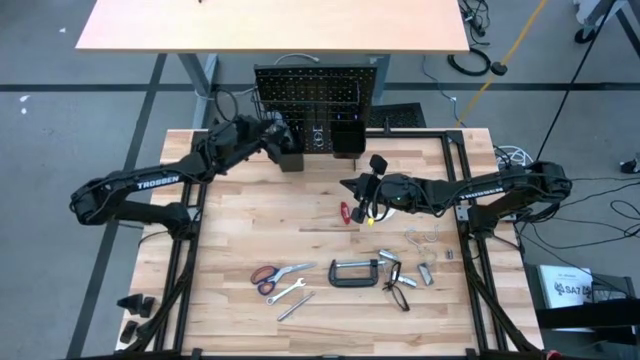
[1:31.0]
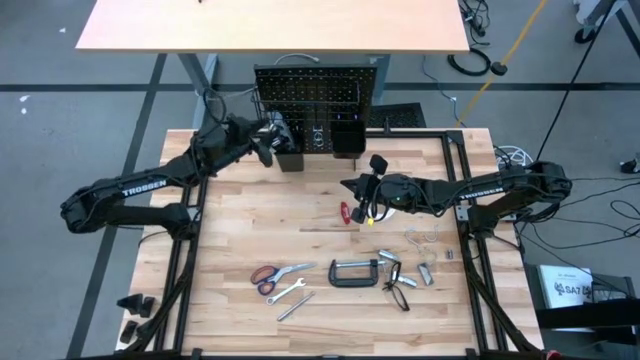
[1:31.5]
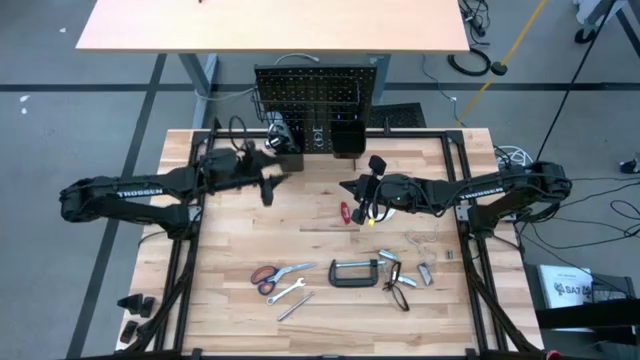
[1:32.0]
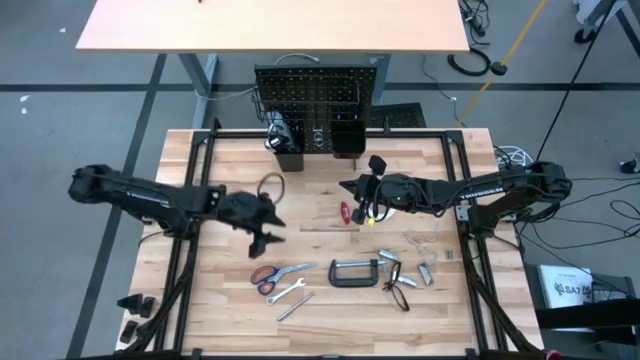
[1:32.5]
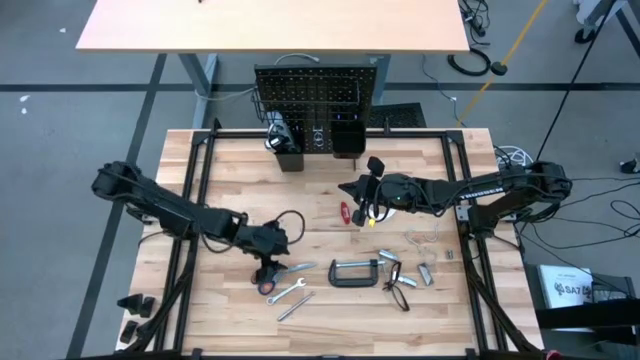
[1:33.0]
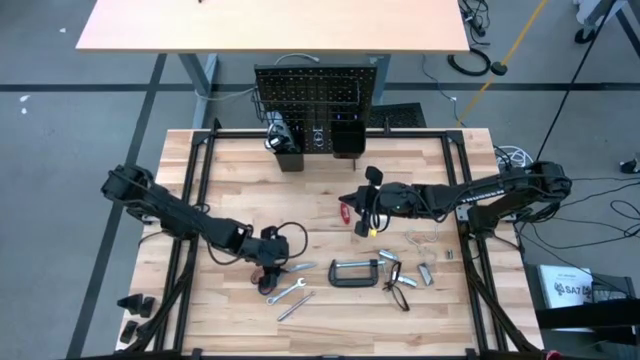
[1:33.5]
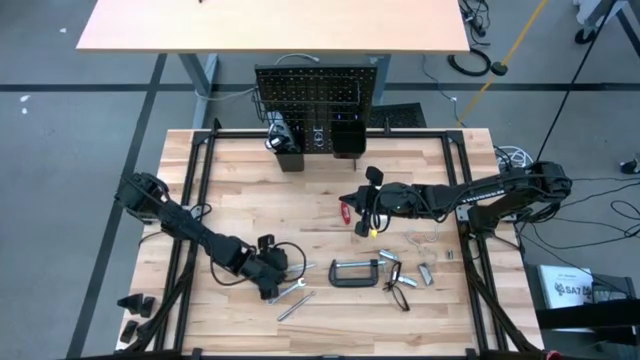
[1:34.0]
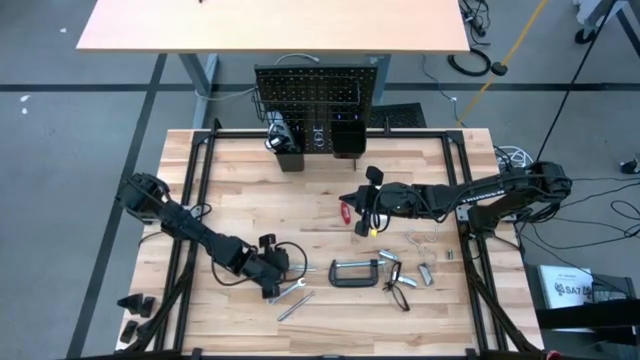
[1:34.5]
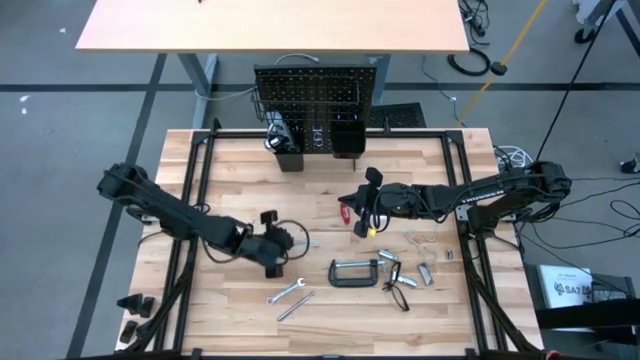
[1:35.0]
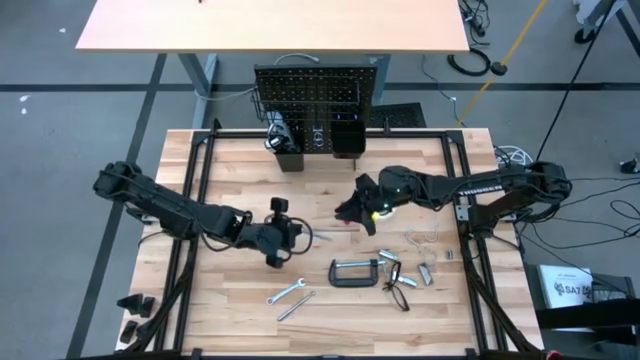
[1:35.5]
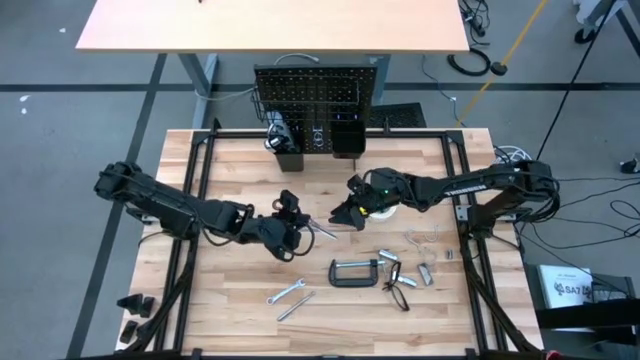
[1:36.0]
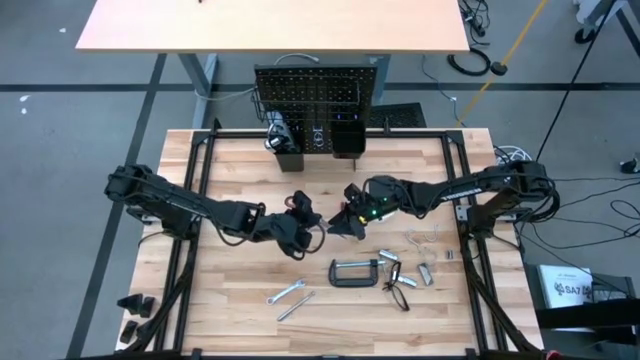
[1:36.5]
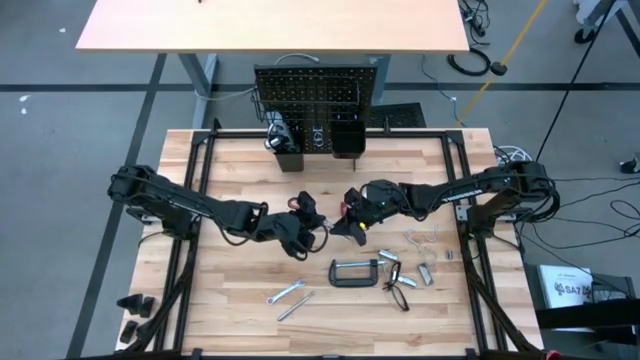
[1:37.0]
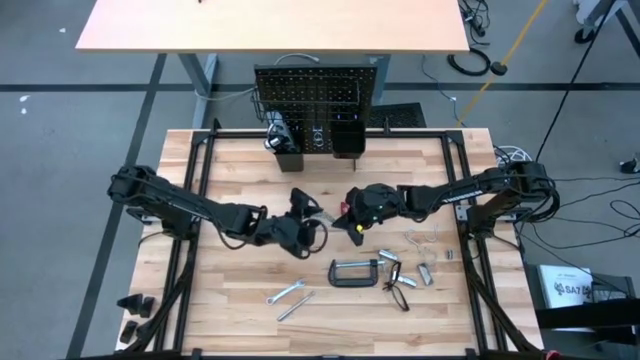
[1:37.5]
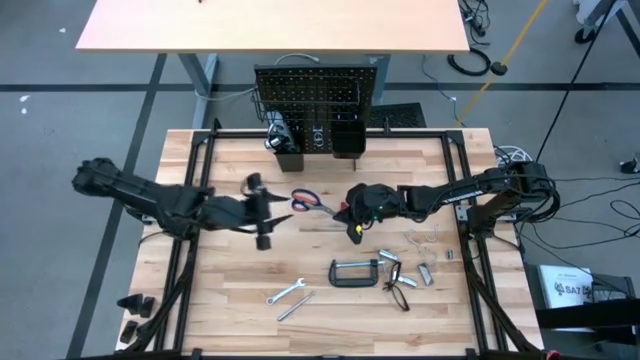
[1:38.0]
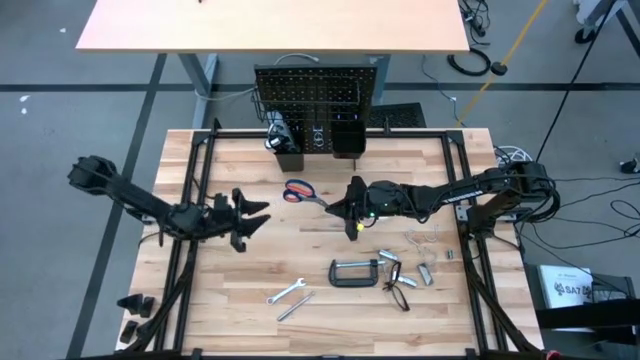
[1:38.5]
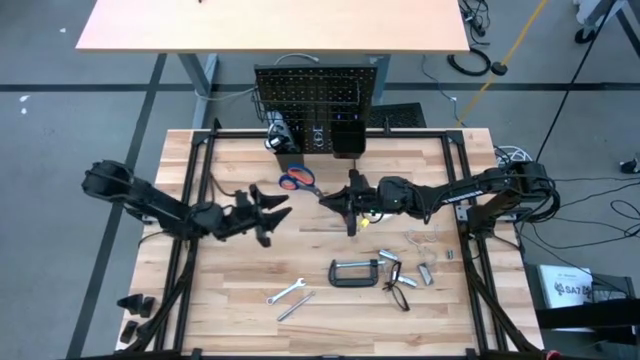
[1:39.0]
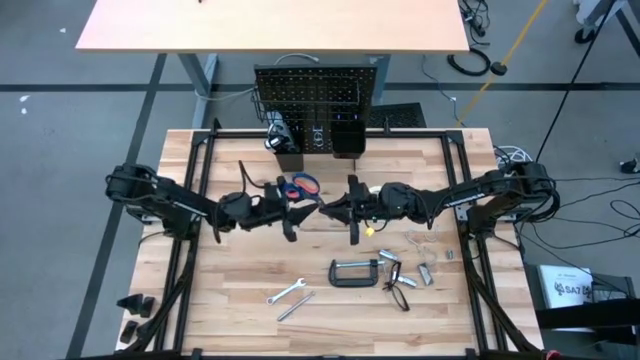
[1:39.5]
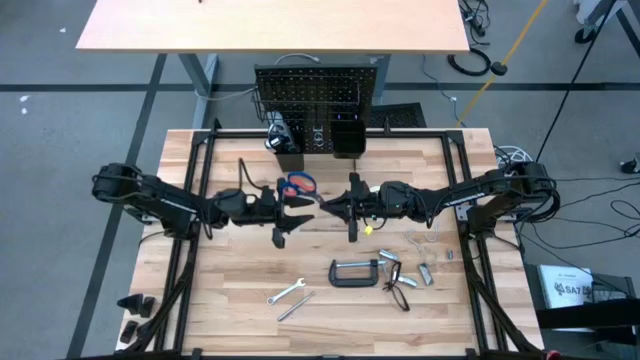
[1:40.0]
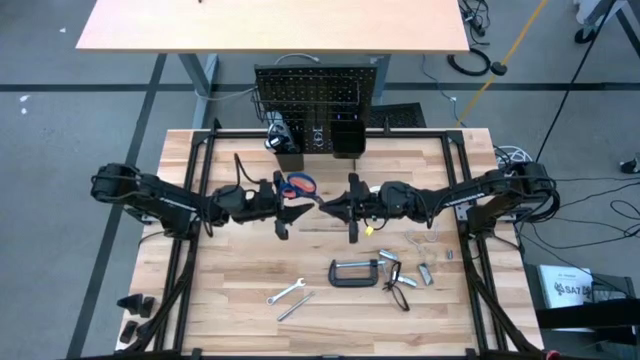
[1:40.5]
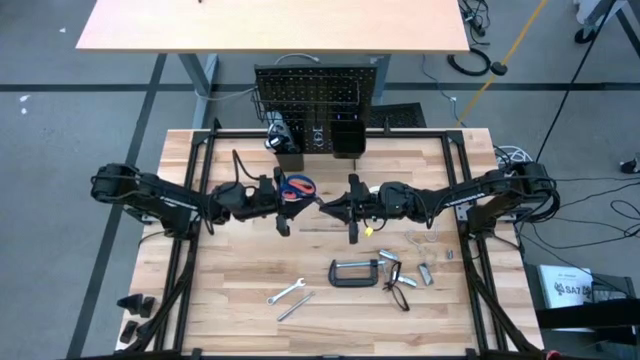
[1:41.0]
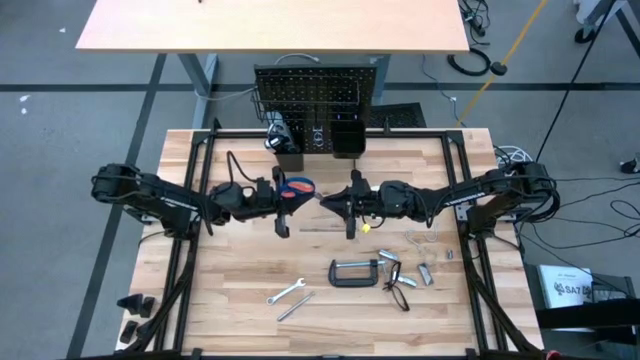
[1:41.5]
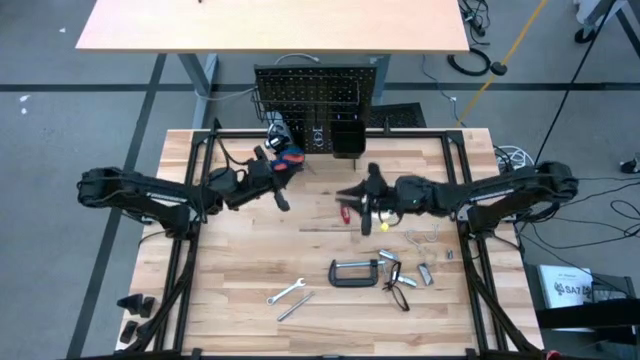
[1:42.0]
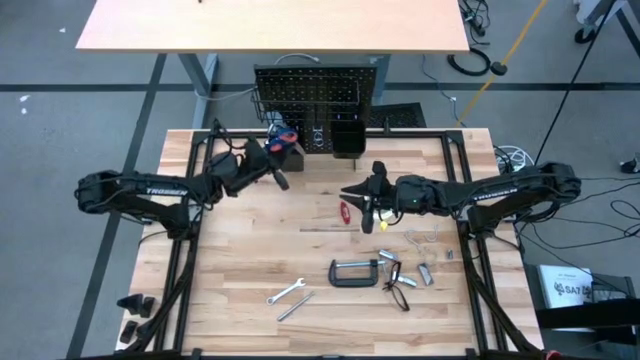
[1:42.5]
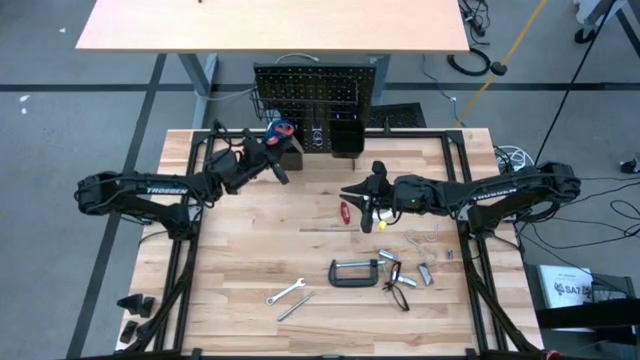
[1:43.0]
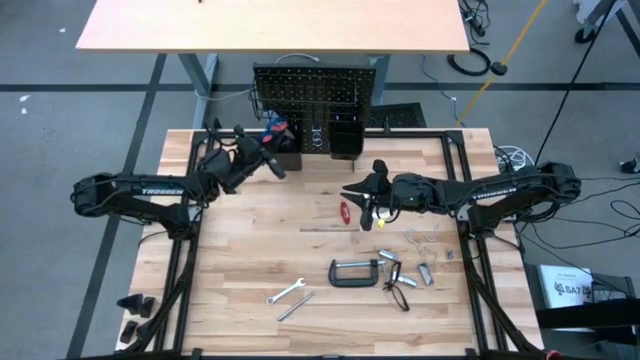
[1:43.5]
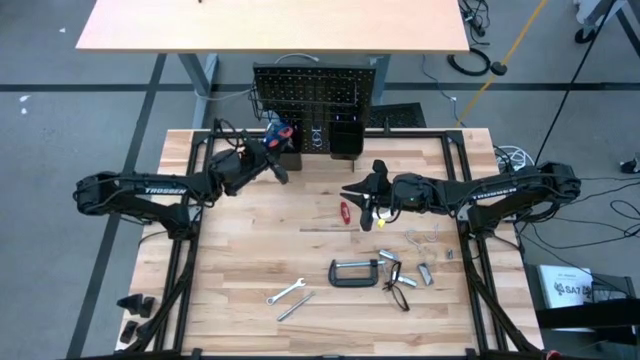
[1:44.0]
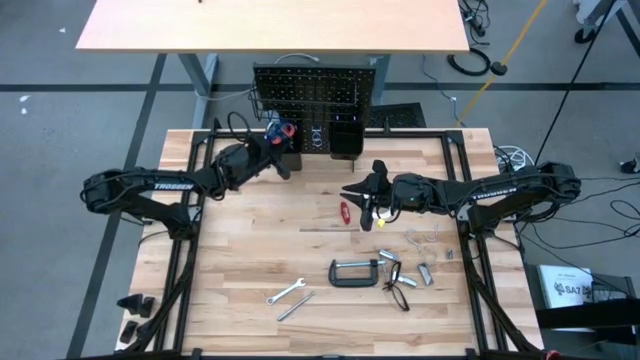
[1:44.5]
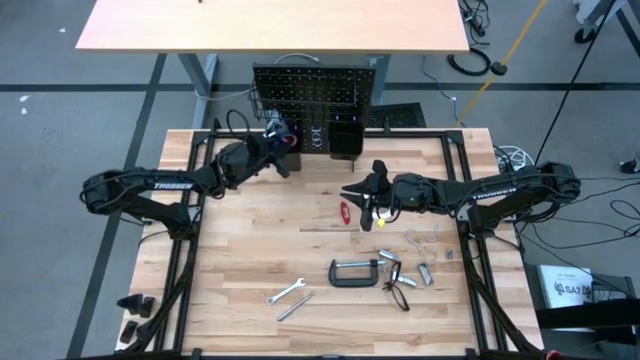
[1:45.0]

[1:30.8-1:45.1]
Task: Hang tools onto peg board
Put the scissors on the left lower deck of the pegboard
